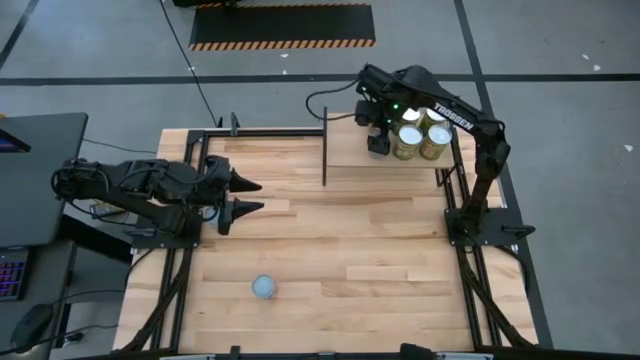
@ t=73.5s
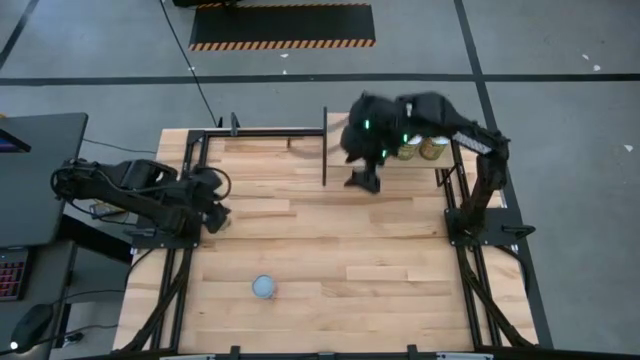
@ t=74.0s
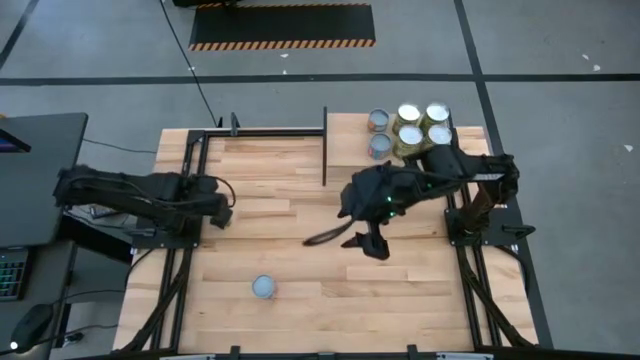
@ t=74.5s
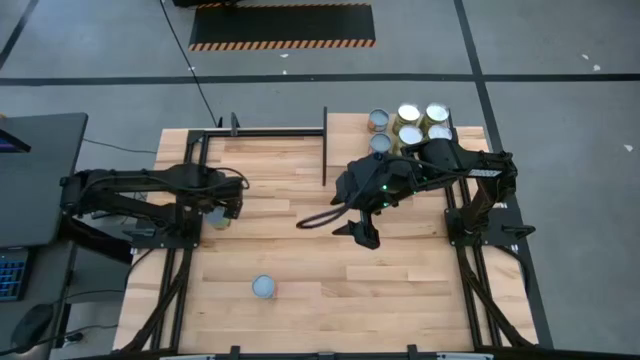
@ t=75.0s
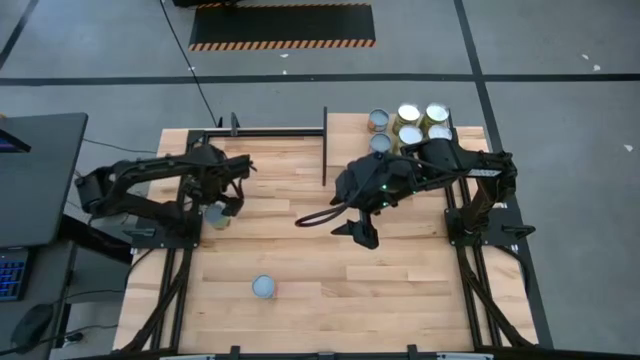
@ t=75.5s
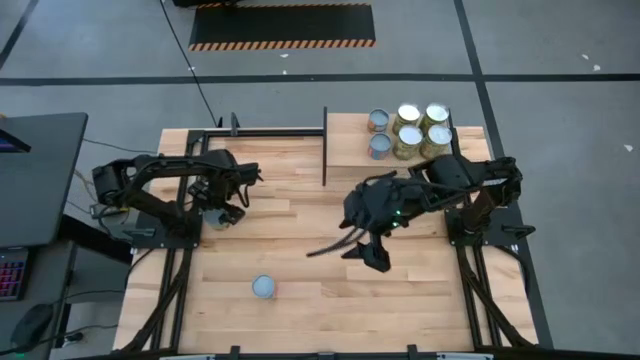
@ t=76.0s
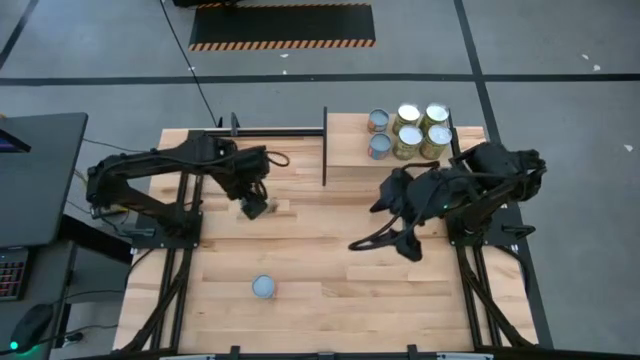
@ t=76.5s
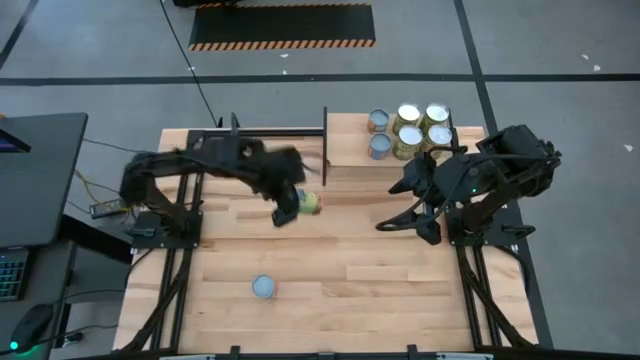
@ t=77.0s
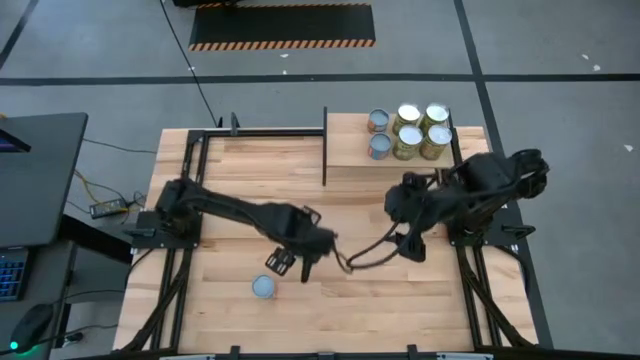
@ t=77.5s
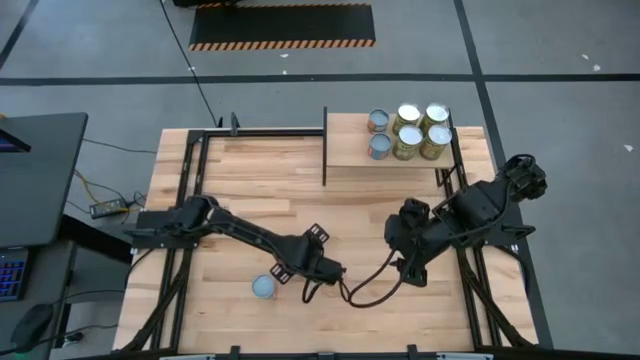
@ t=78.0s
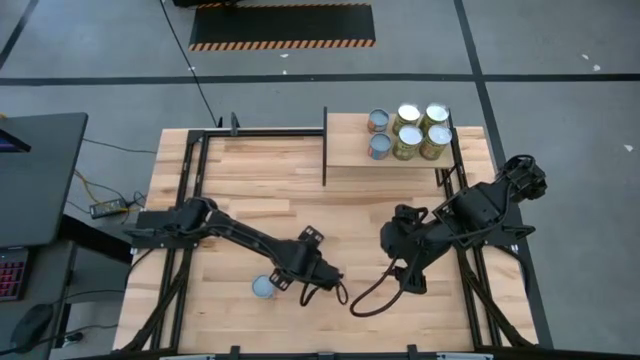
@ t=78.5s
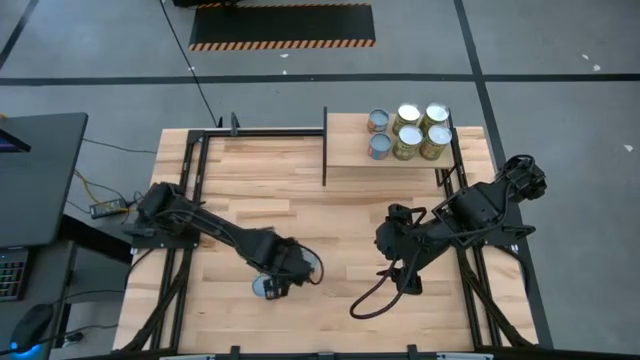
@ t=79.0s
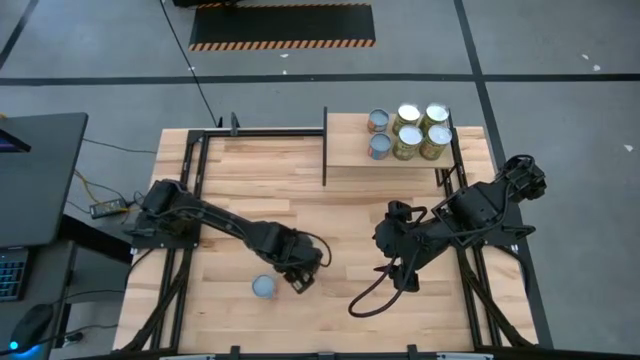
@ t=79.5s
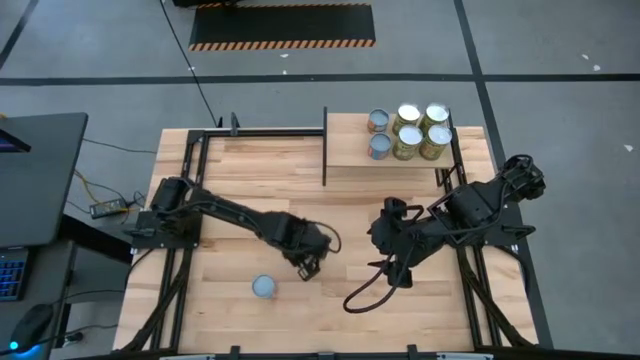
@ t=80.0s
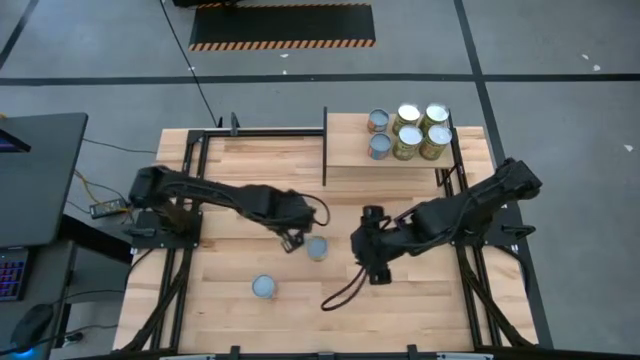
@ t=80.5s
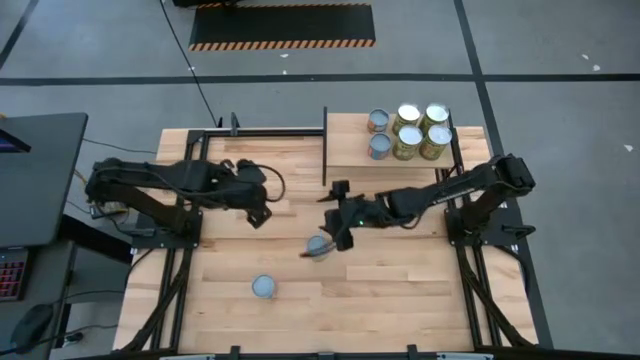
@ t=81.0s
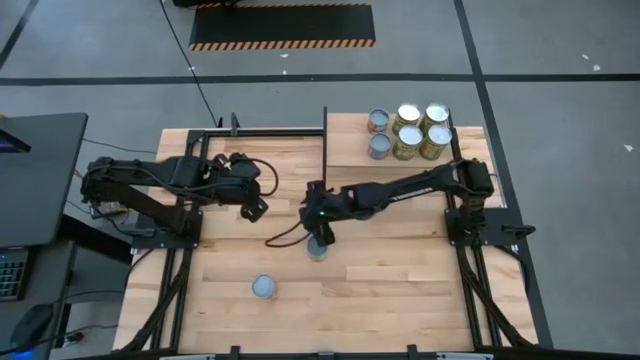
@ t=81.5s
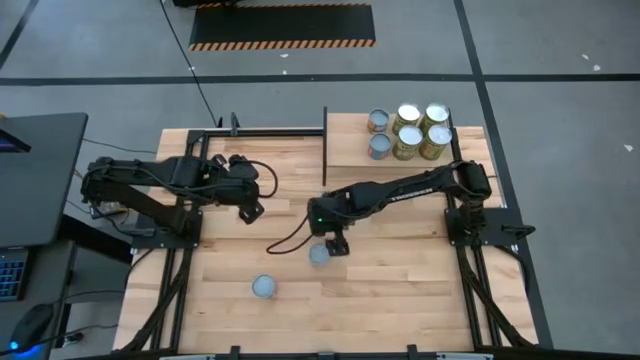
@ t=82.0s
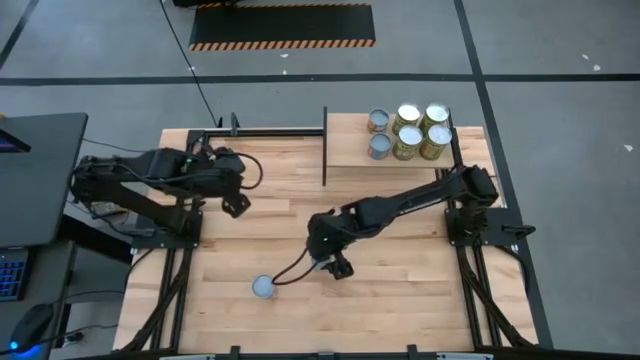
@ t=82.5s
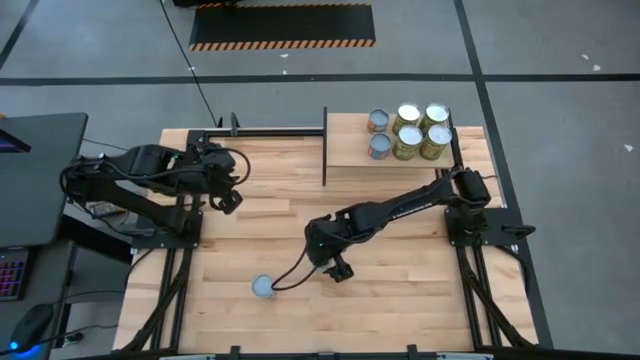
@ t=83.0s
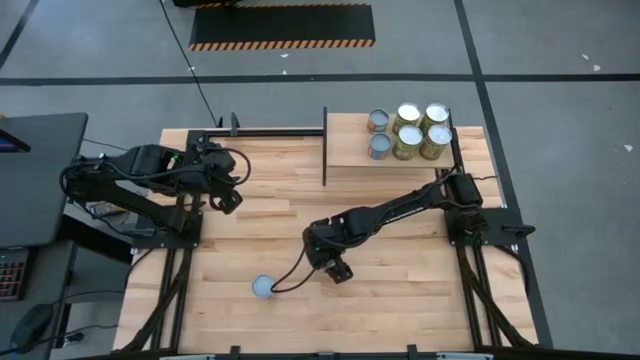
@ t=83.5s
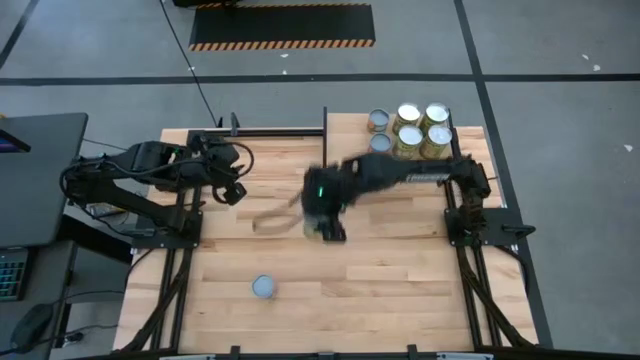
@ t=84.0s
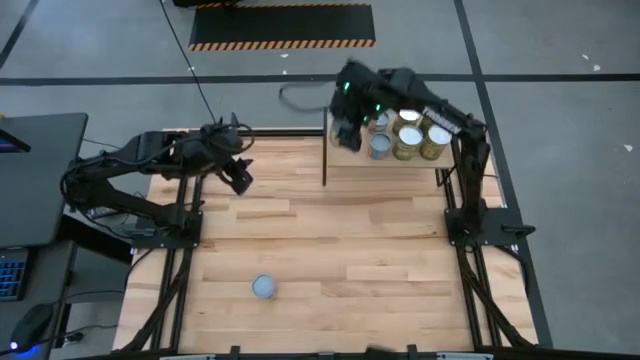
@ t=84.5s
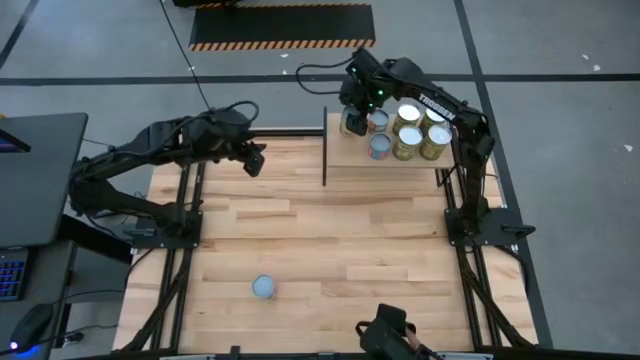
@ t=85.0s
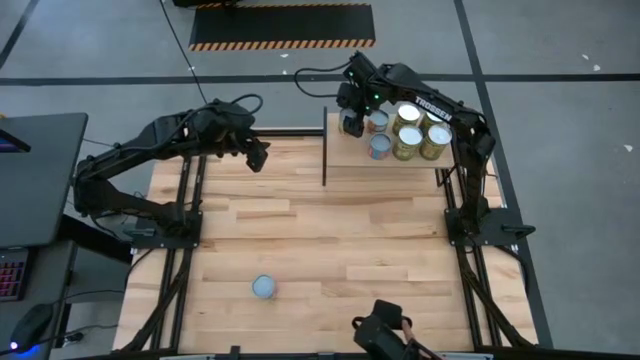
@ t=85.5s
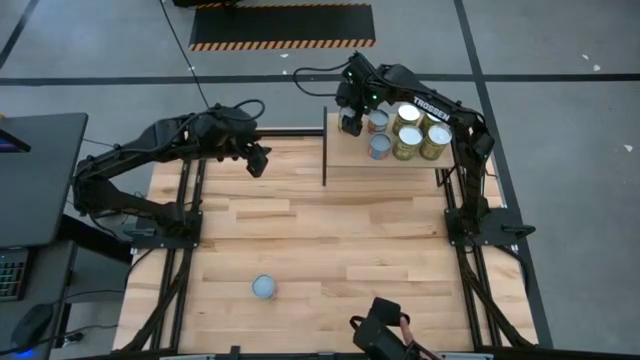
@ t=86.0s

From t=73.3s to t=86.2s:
Task: Pick and place cans onto a shelf
Put the small canned spaghetti sauce on the shelf

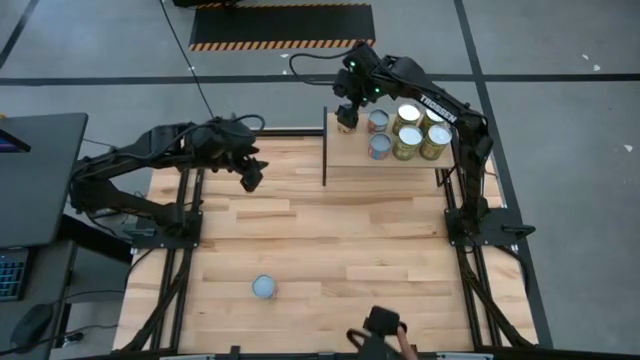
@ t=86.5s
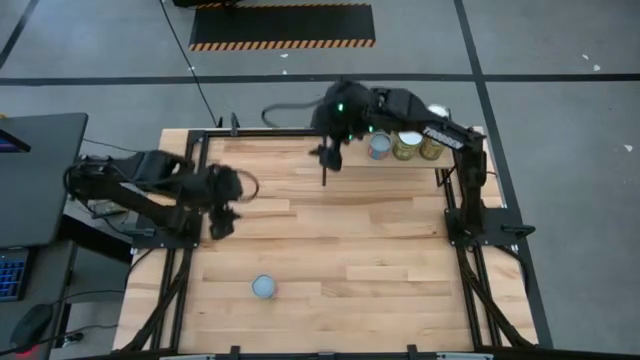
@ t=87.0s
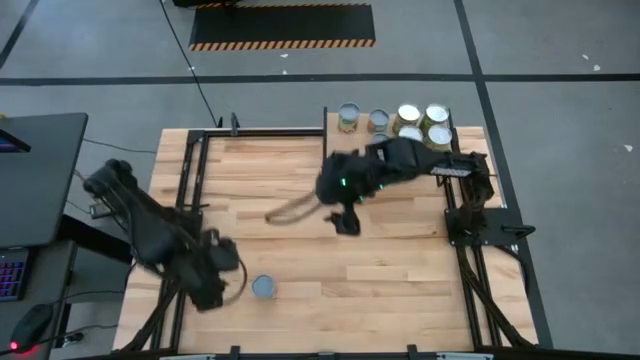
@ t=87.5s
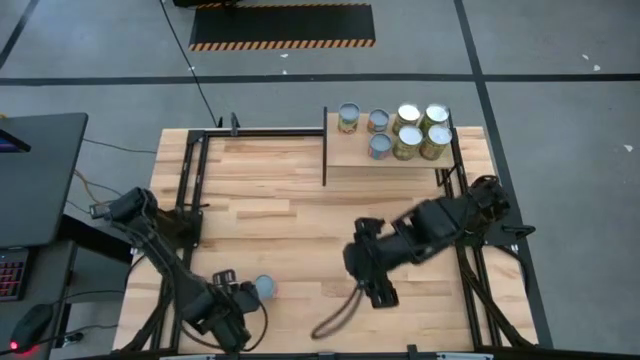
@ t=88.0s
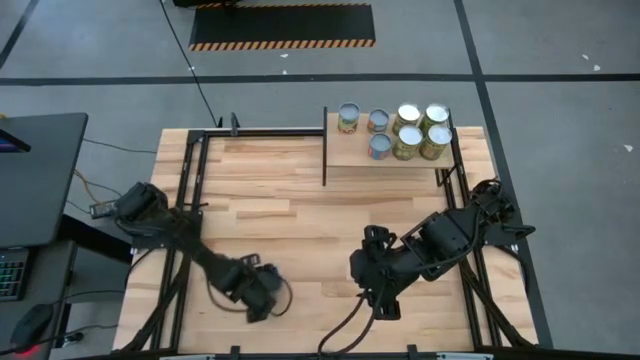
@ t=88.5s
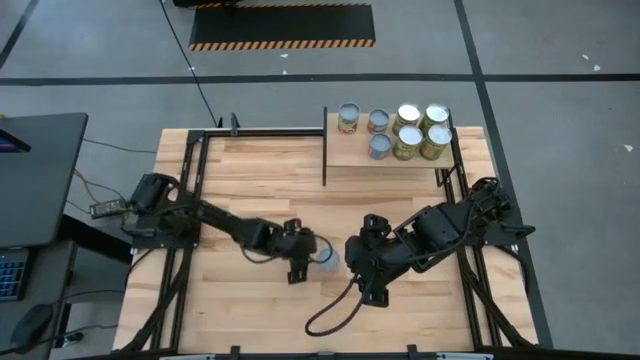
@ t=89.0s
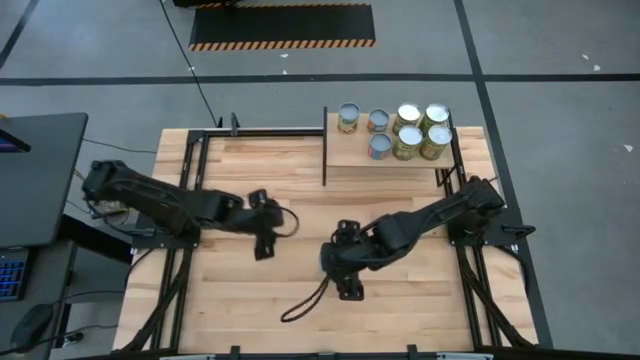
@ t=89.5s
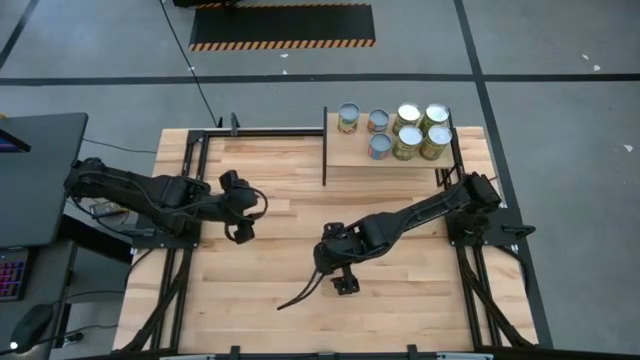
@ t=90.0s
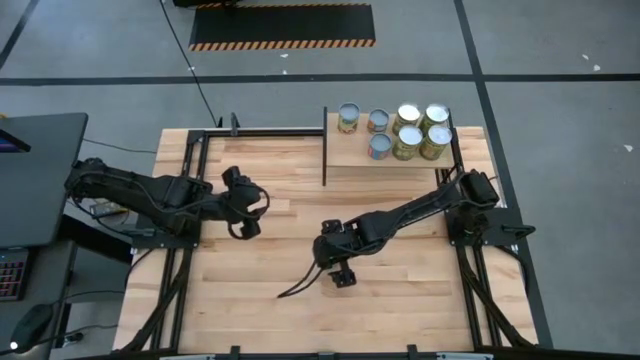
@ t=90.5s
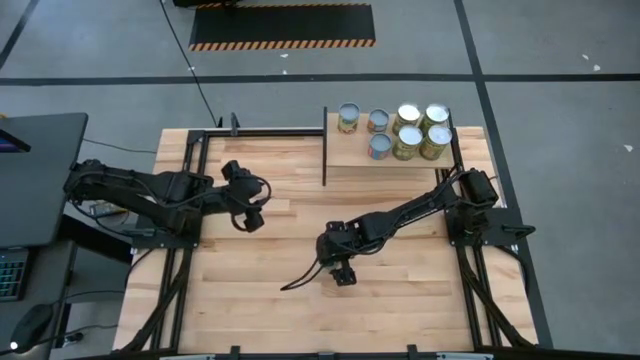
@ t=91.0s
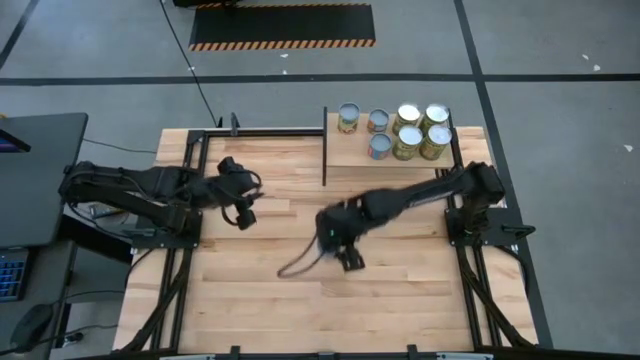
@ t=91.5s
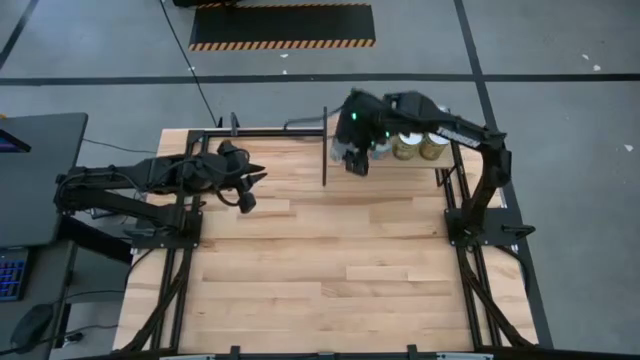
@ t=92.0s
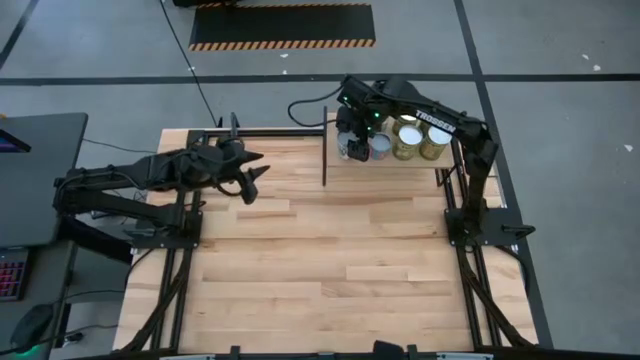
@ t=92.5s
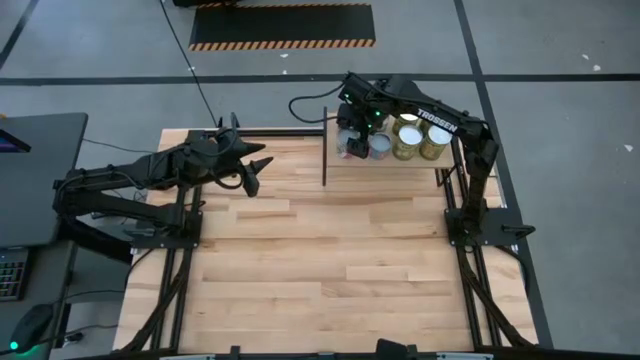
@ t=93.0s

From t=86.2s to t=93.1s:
Put the small canned mixed fruits on the shelf

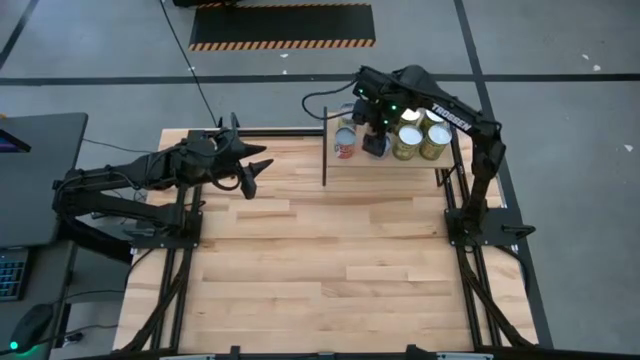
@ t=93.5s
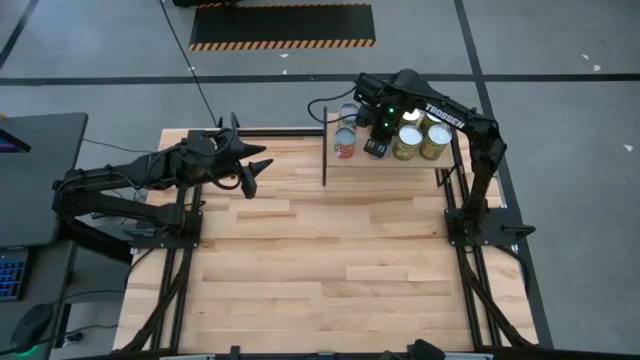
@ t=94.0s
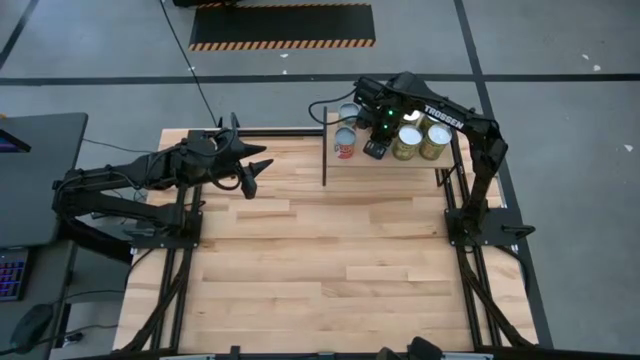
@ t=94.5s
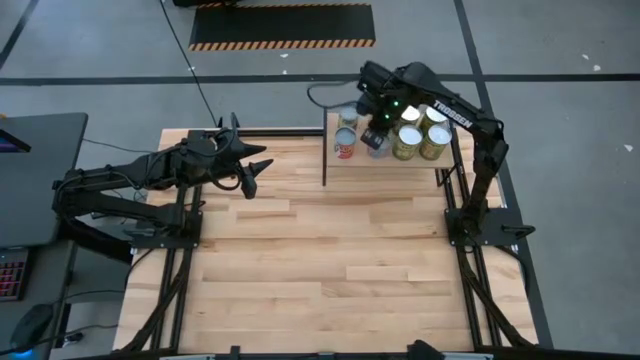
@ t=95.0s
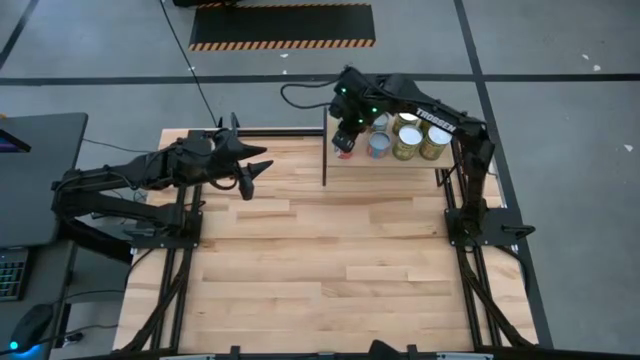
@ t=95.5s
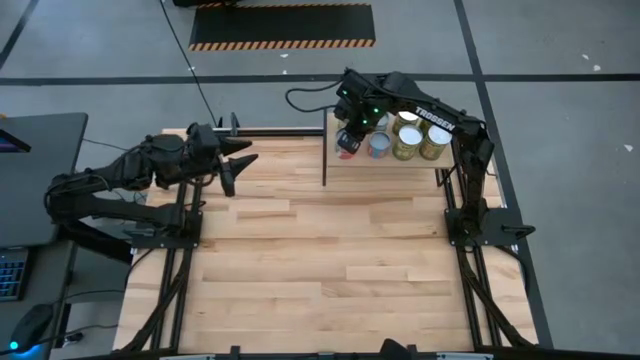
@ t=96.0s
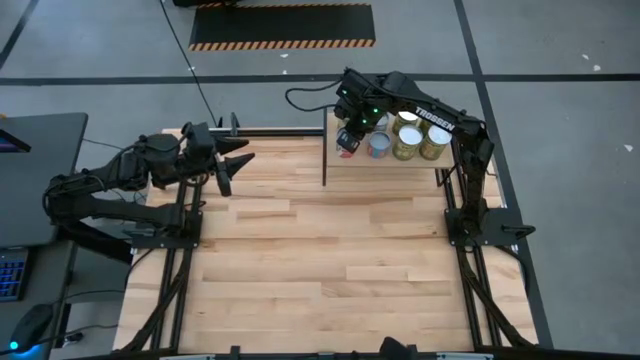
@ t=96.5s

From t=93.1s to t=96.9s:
Adjust the cans on the shelf
